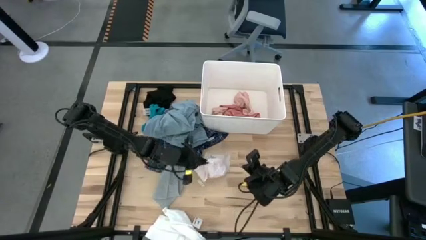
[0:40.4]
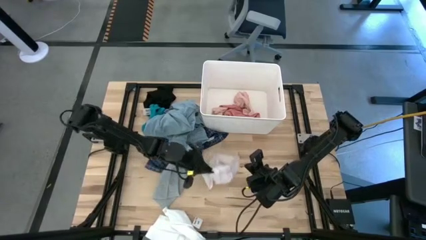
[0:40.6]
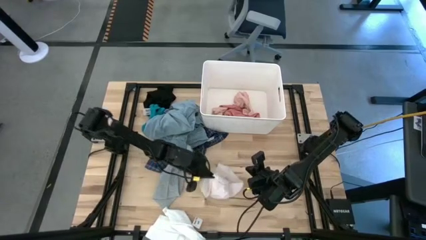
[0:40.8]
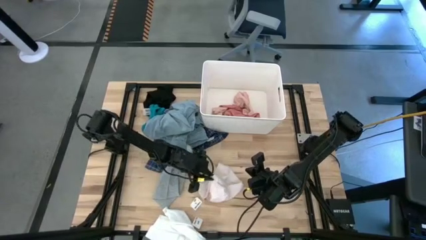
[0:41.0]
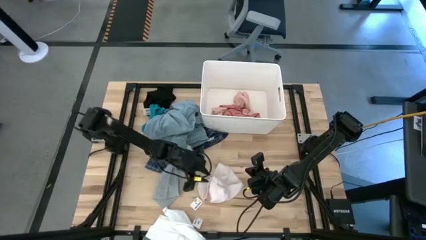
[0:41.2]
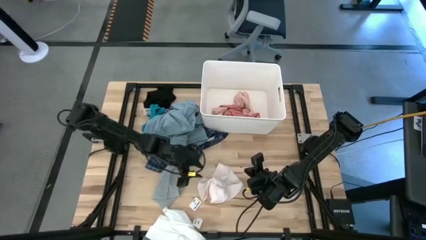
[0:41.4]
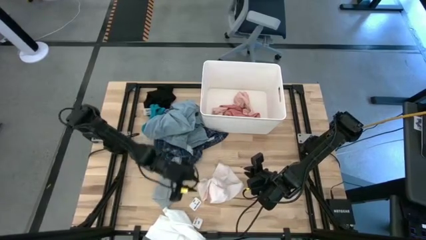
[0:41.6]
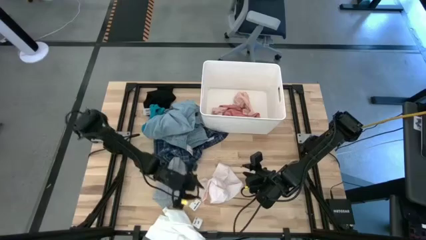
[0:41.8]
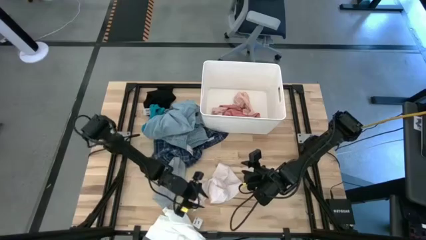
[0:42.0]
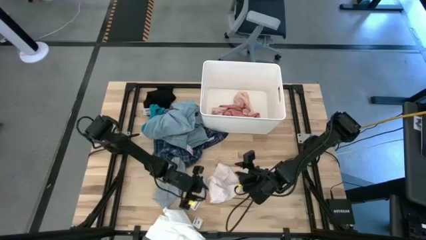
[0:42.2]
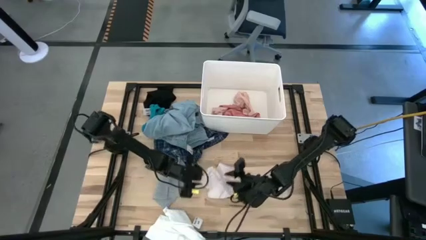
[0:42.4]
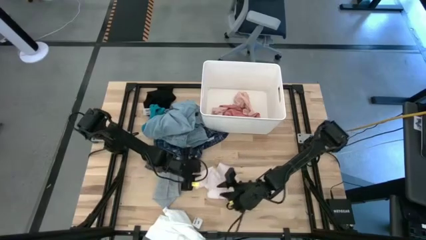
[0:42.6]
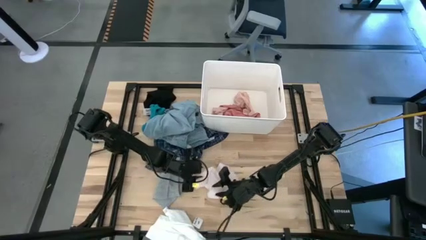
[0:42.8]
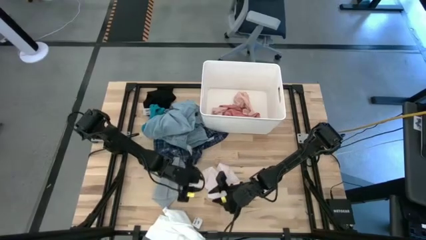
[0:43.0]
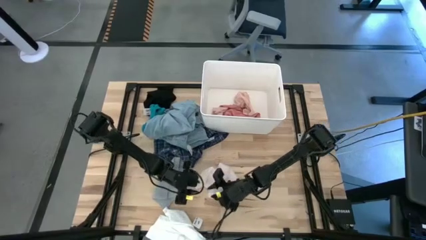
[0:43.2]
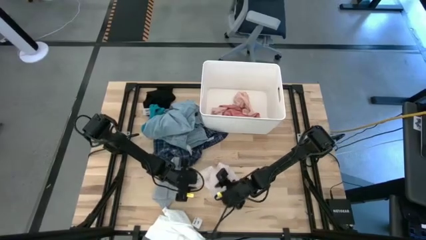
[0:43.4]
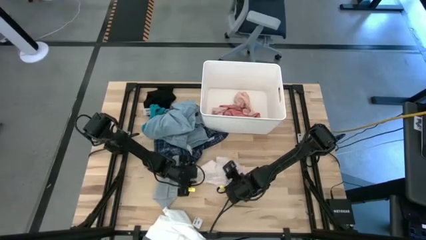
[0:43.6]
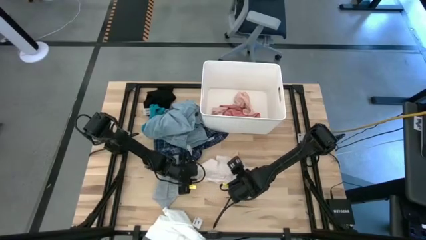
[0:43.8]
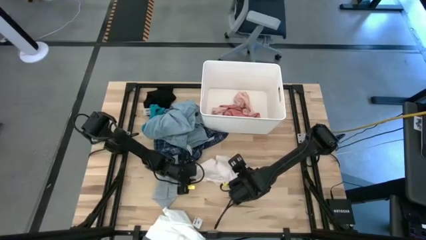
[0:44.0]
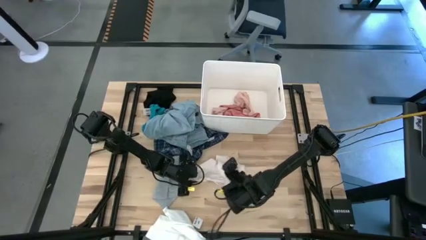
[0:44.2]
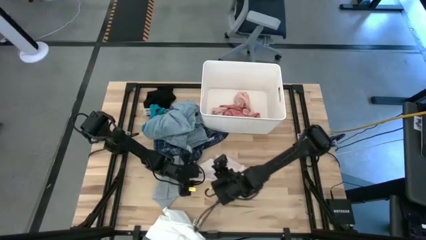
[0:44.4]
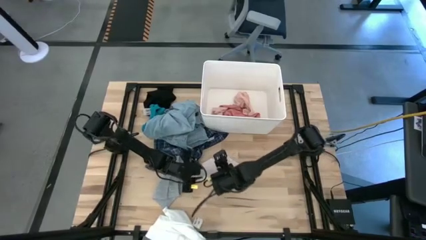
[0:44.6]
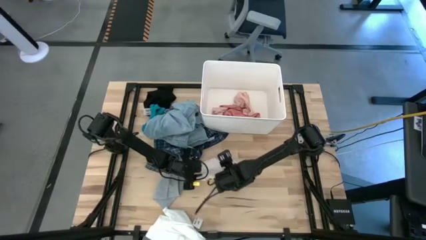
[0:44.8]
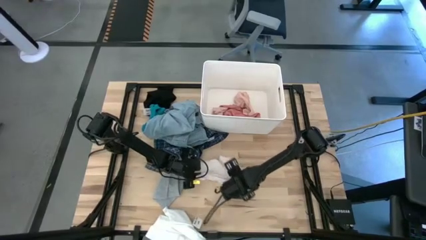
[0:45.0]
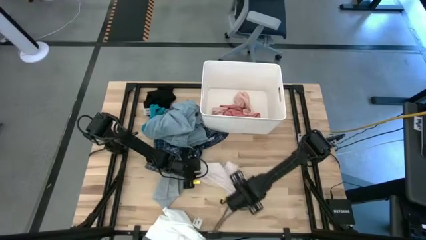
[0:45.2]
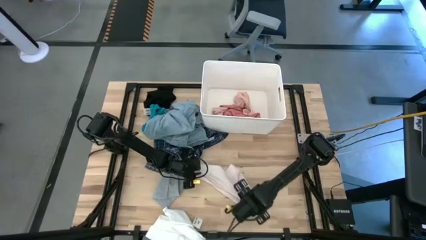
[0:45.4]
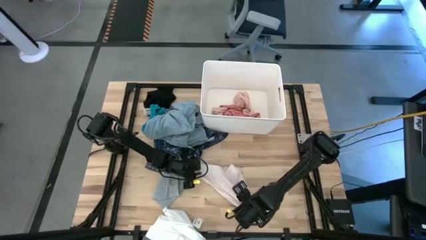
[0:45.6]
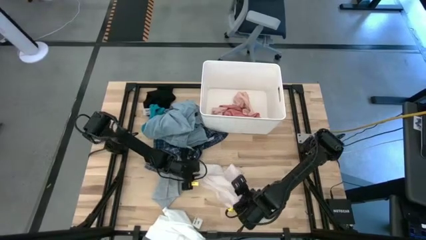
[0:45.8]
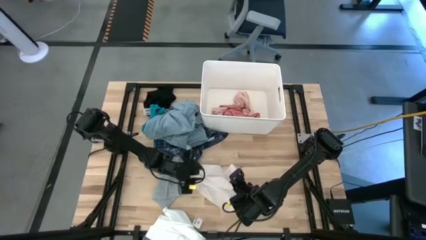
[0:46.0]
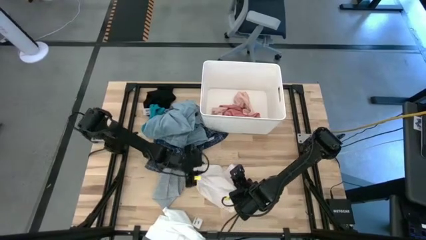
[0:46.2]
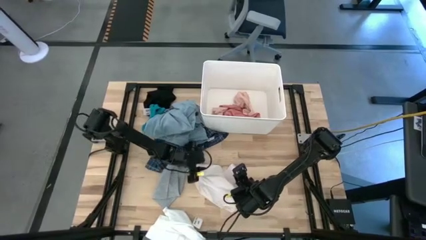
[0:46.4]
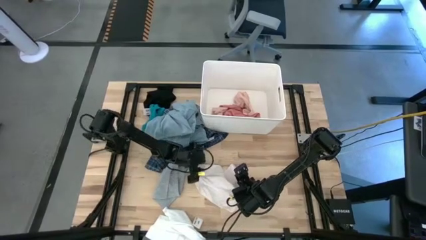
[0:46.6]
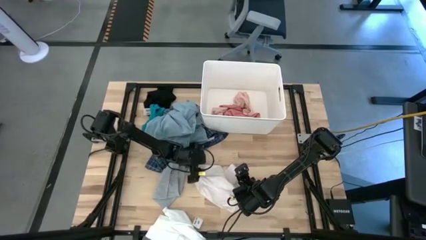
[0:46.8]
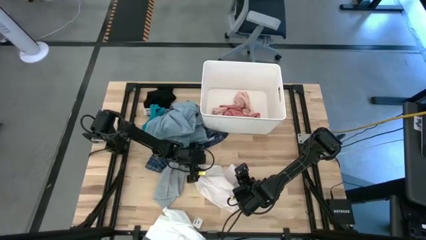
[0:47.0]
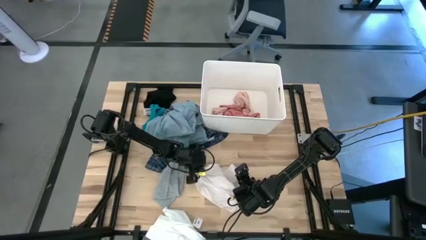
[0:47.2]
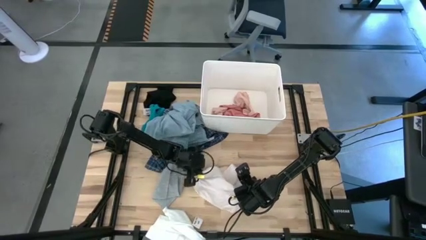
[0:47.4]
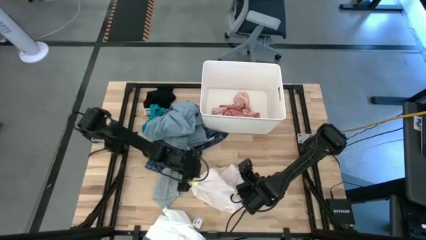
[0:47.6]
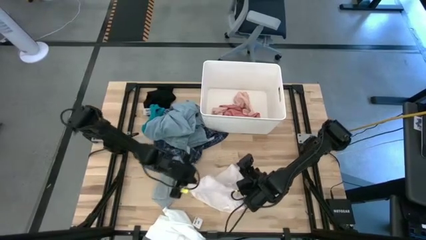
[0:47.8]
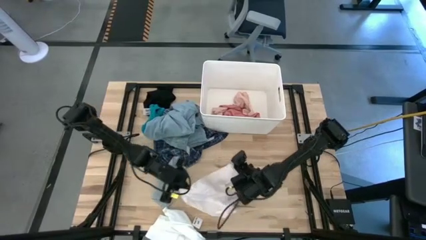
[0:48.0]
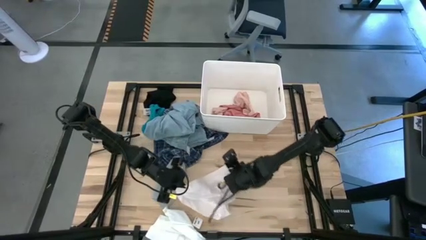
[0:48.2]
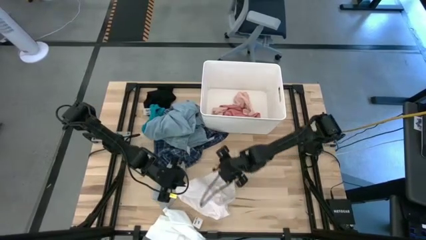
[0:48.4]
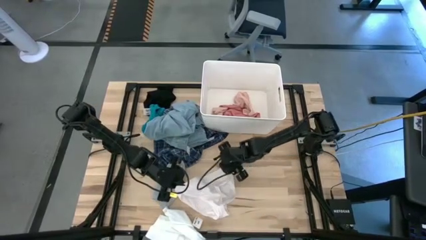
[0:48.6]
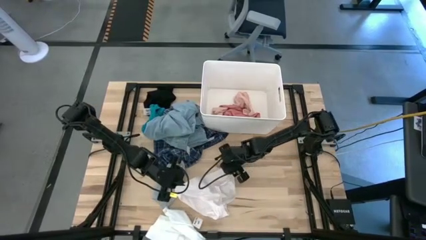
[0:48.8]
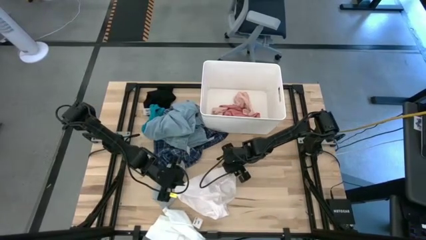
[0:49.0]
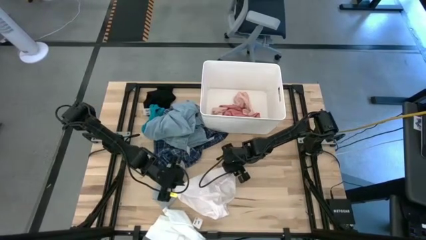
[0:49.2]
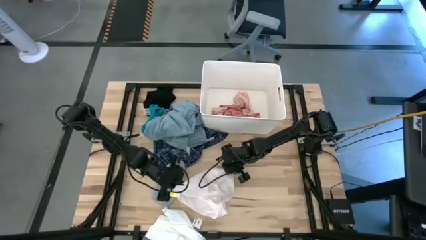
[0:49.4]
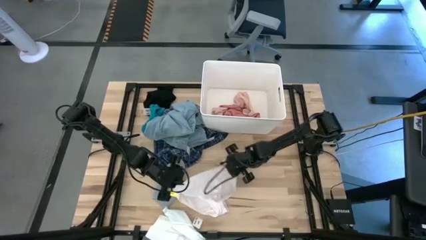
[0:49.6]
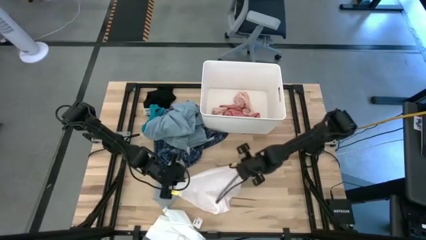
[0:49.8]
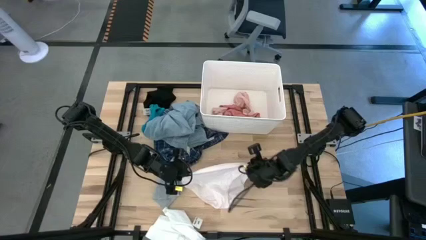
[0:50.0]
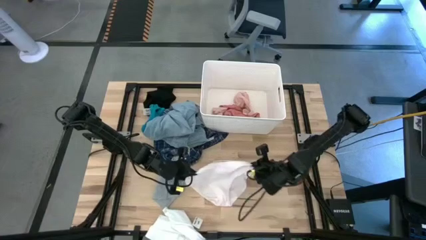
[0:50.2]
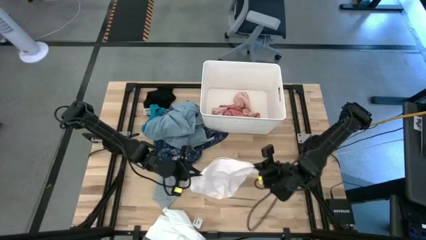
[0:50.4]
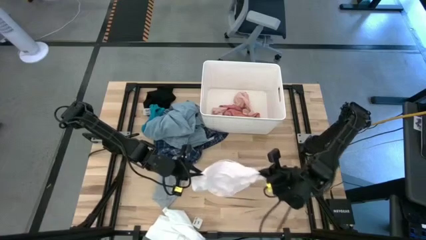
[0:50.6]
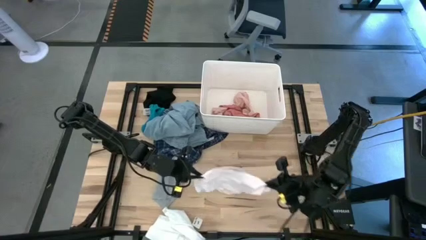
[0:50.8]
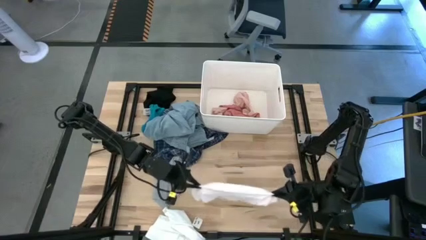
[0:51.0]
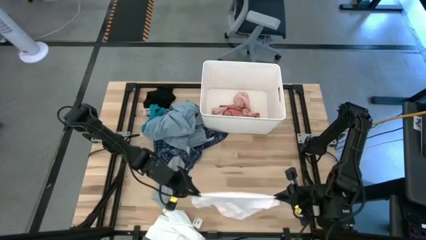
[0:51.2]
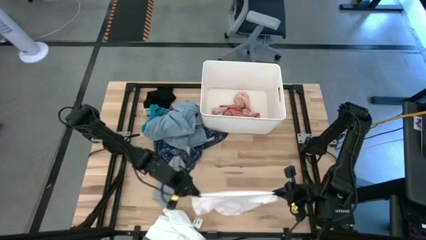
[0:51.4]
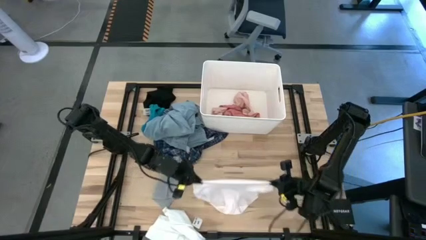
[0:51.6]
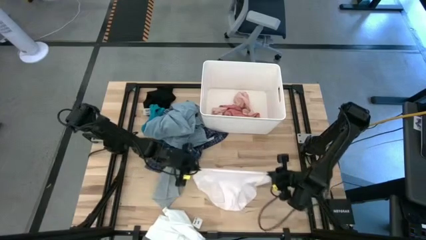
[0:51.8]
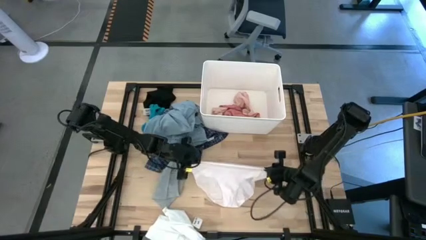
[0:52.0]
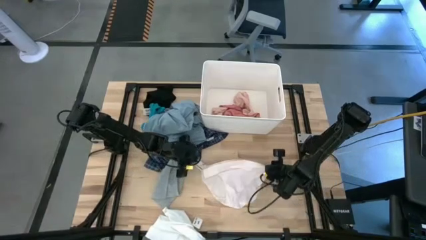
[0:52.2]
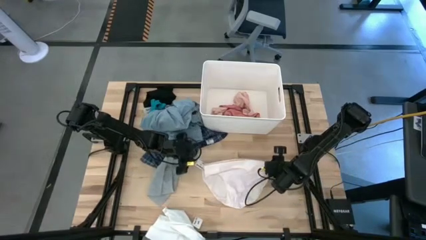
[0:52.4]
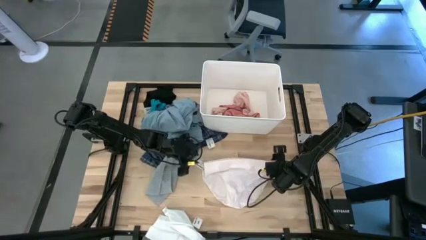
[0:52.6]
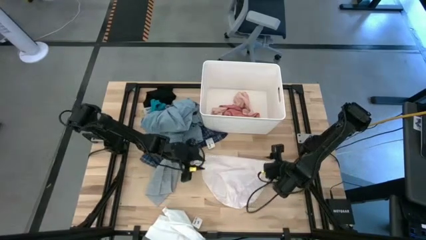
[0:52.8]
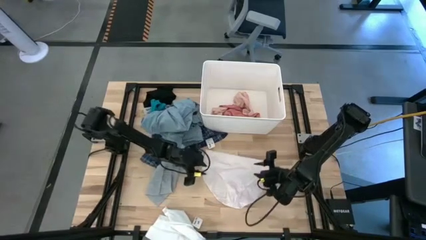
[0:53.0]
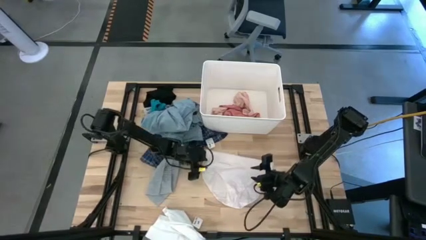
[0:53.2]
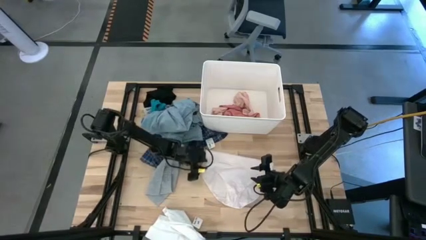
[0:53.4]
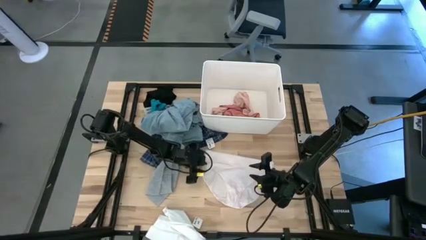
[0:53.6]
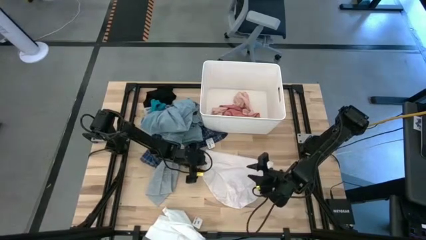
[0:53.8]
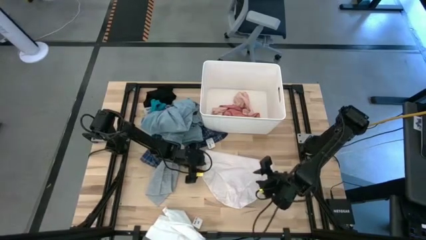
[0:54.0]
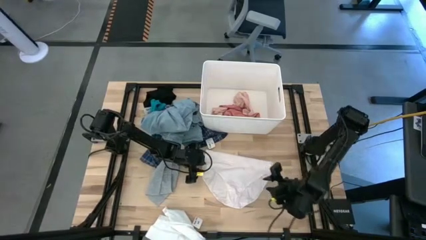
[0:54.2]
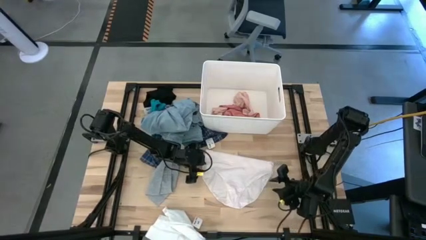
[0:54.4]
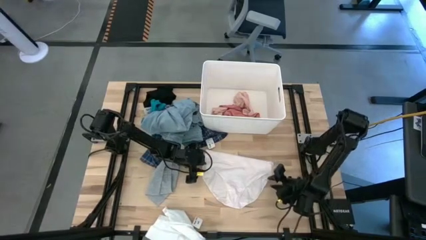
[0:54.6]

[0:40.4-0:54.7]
Task: Sort clothes
Put the white underwear into the white laundry bin

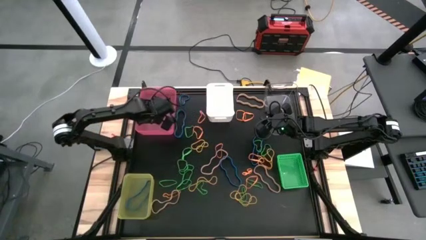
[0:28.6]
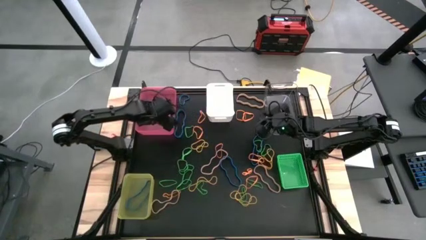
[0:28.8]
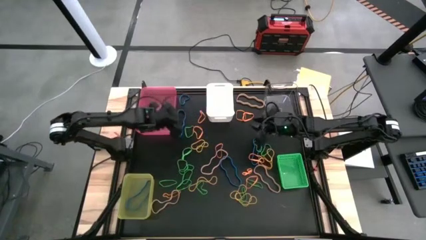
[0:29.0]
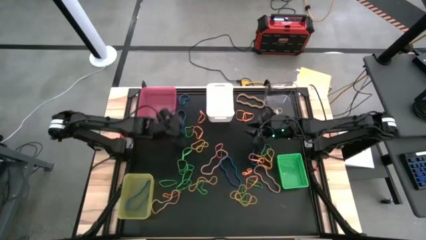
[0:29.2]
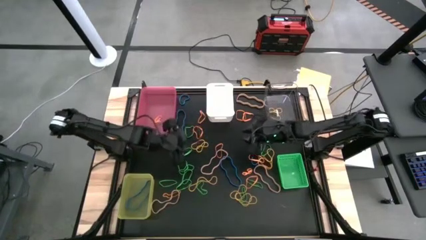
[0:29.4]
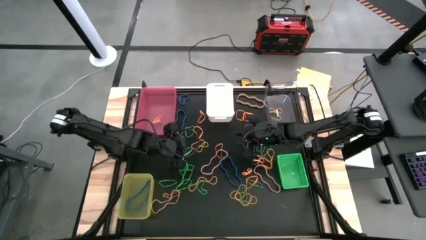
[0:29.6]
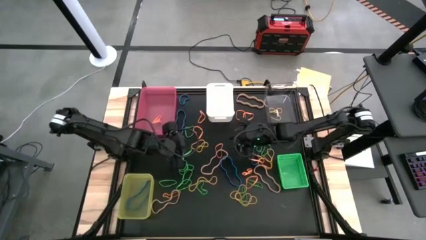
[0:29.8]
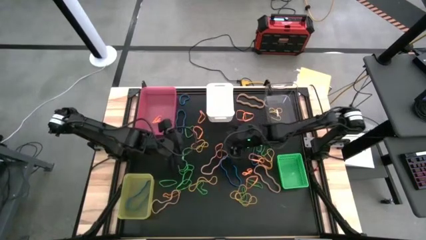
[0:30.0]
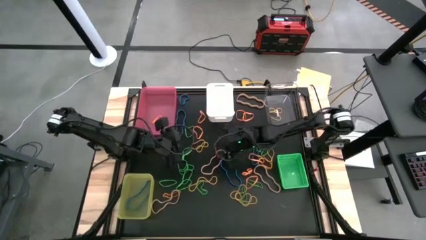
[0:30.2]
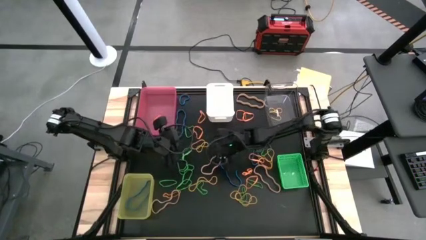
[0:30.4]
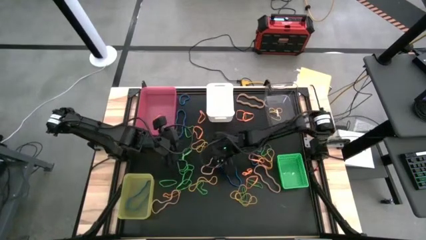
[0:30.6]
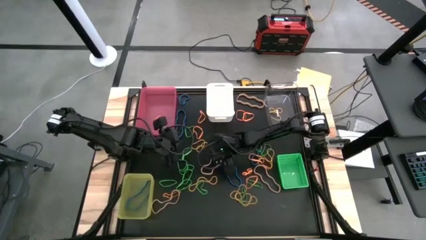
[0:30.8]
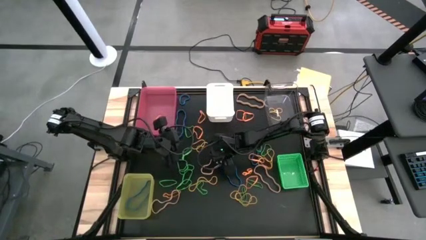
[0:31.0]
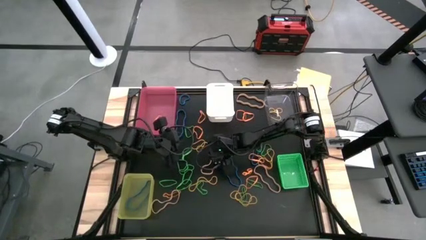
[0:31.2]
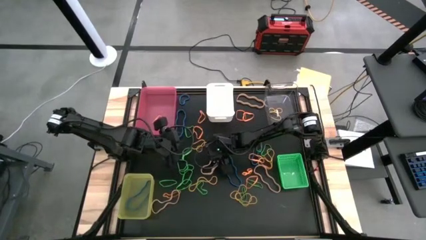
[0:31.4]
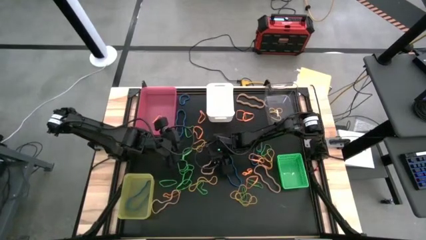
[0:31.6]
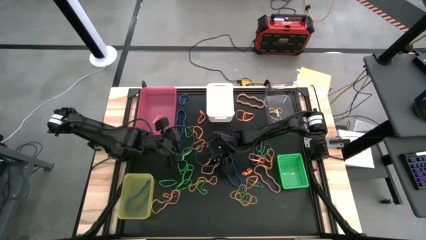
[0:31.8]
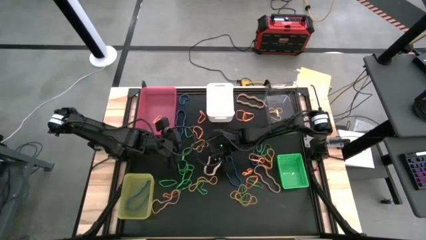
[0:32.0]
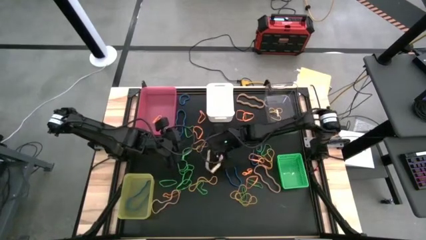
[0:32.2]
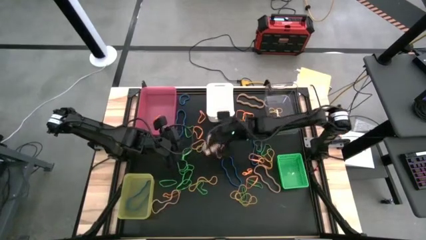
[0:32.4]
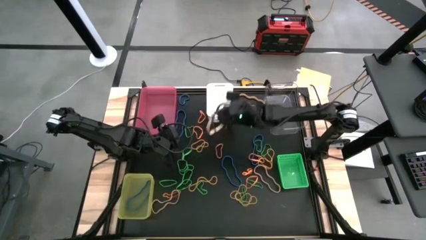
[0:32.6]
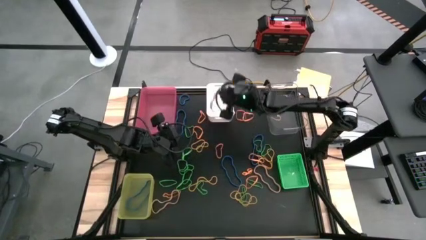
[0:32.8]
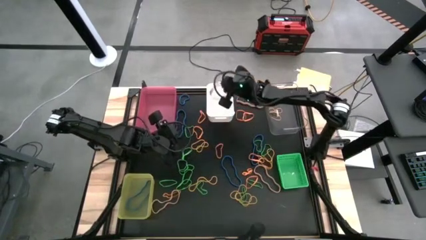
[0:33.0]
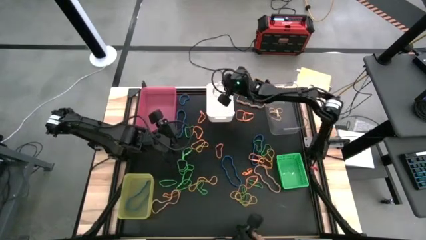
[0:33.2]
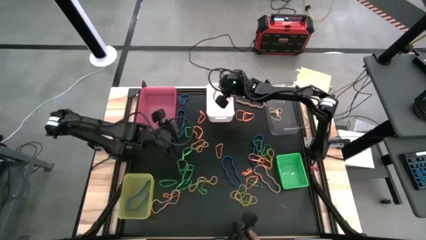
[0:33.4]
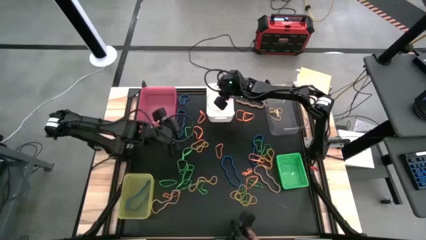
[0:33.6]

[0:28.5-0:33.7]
Task: Sort rubber bands into baskets
Put the light orange rubber band into the white bin
